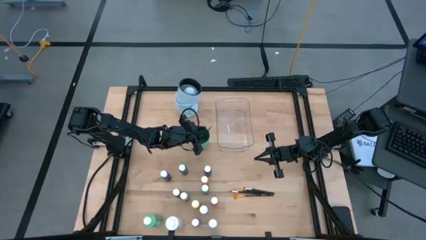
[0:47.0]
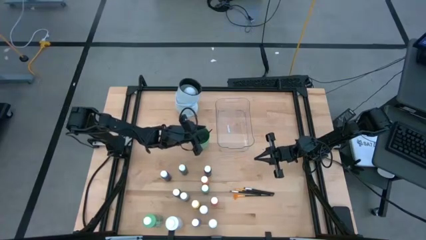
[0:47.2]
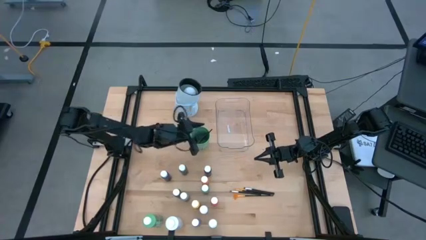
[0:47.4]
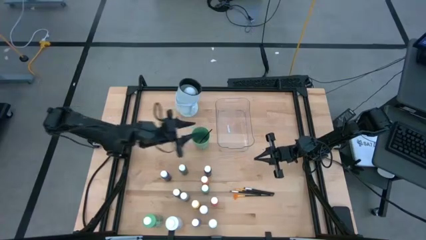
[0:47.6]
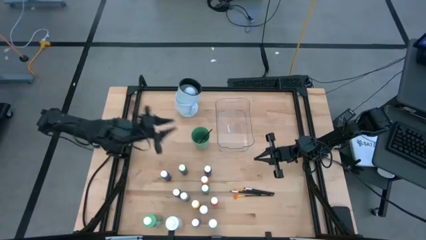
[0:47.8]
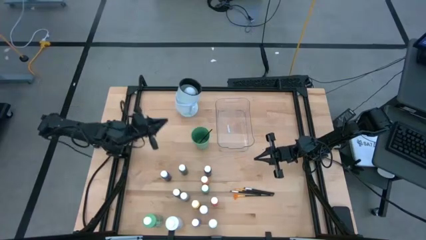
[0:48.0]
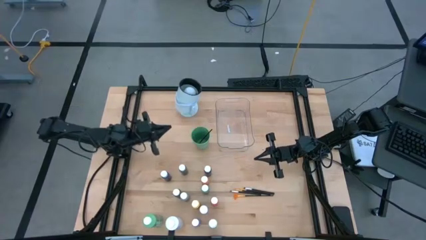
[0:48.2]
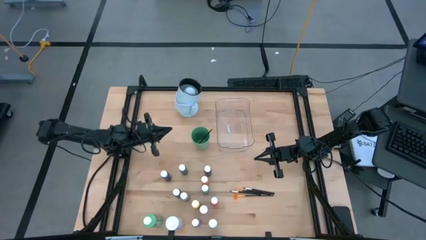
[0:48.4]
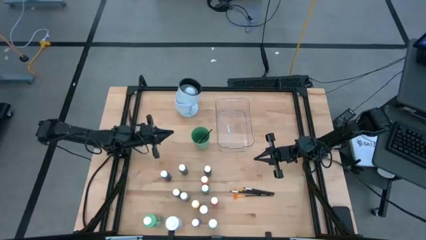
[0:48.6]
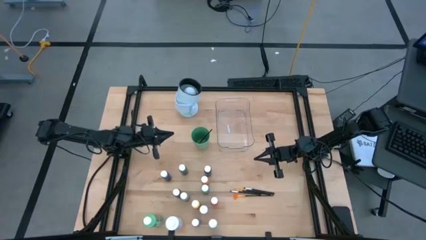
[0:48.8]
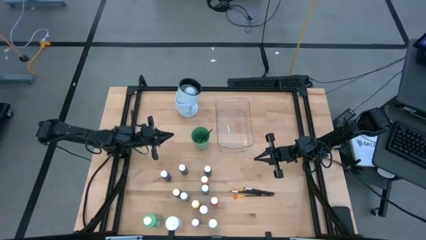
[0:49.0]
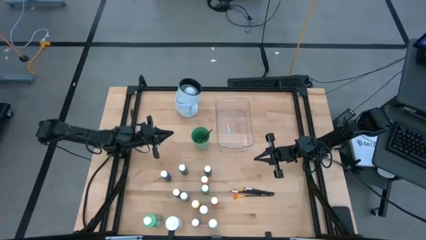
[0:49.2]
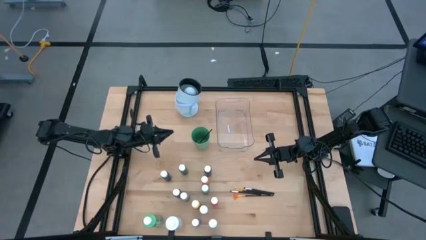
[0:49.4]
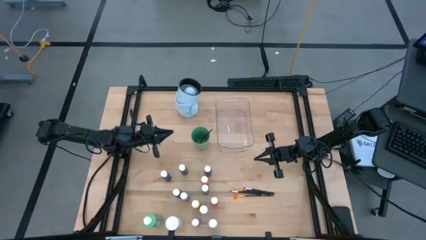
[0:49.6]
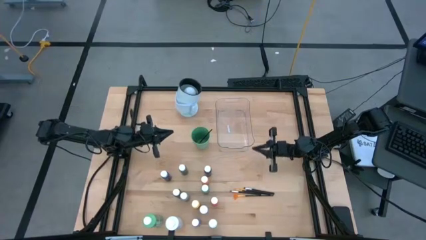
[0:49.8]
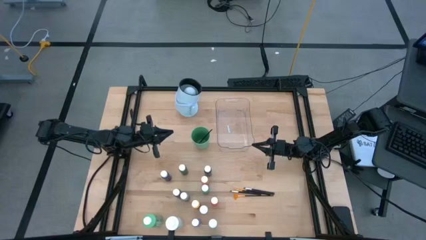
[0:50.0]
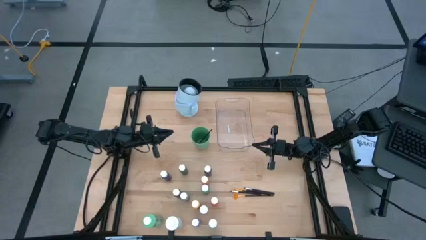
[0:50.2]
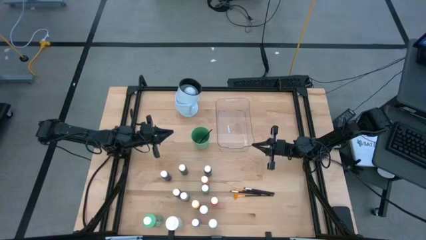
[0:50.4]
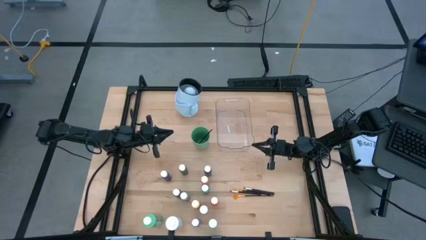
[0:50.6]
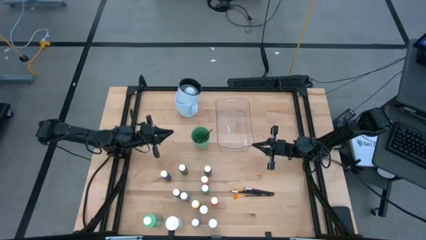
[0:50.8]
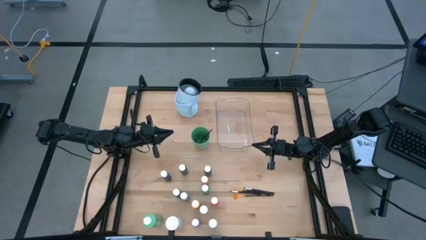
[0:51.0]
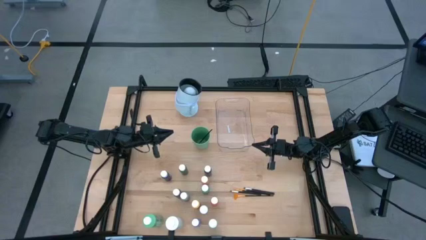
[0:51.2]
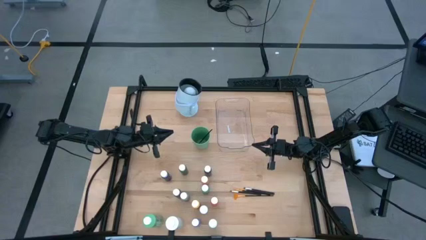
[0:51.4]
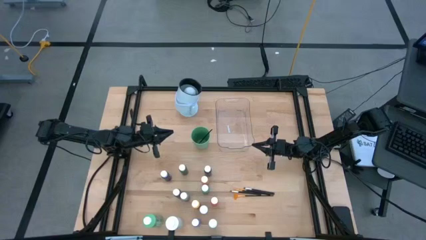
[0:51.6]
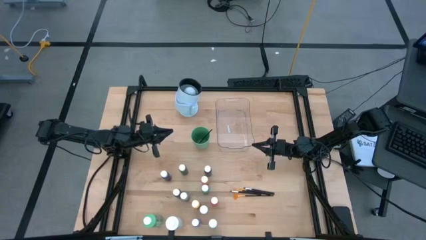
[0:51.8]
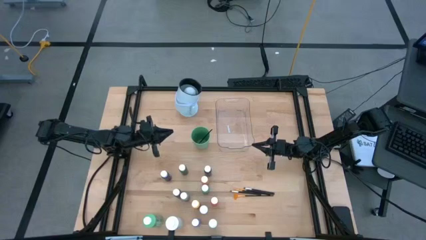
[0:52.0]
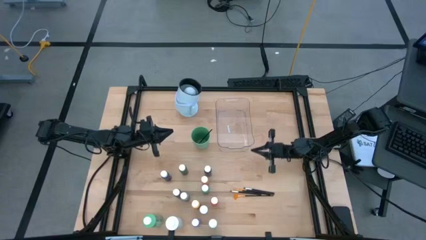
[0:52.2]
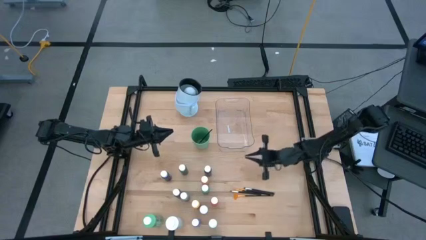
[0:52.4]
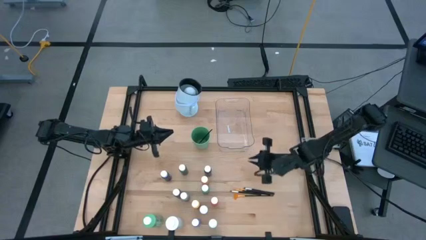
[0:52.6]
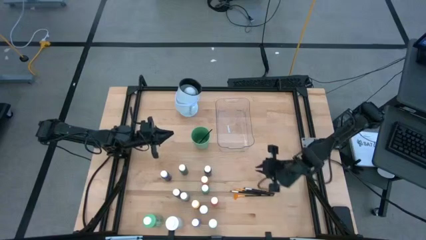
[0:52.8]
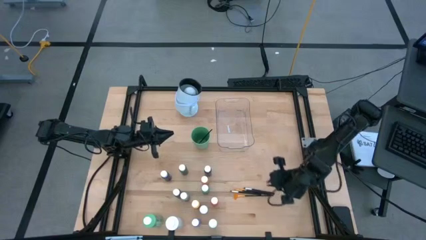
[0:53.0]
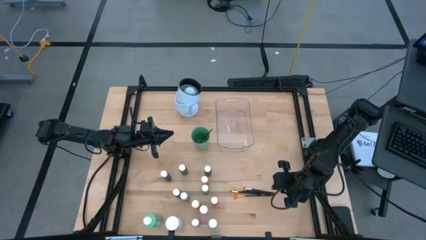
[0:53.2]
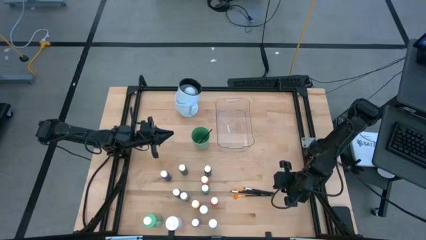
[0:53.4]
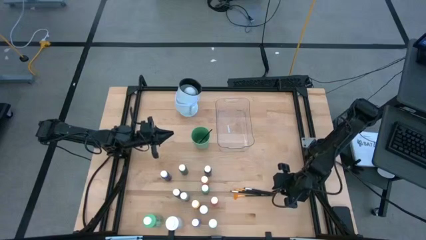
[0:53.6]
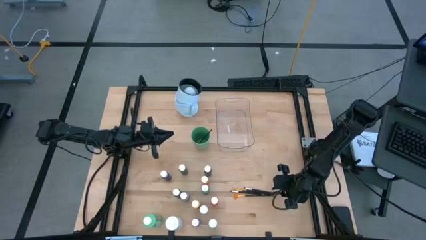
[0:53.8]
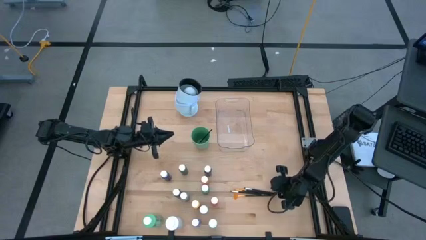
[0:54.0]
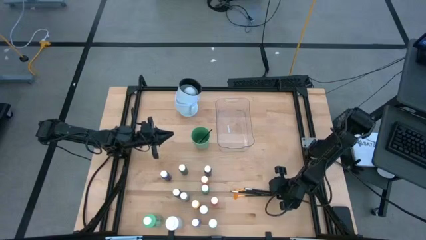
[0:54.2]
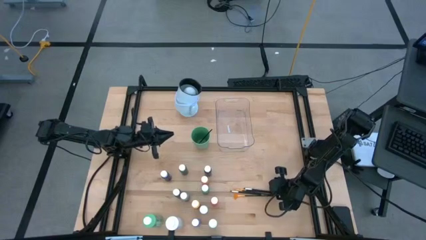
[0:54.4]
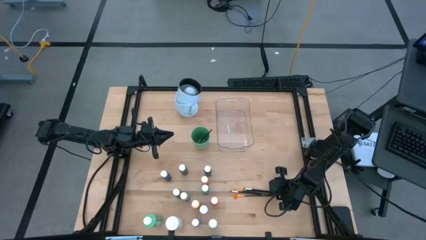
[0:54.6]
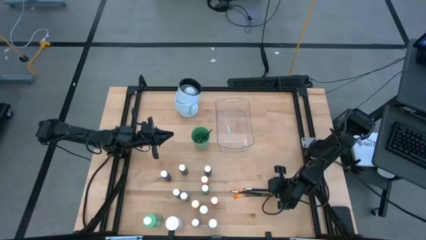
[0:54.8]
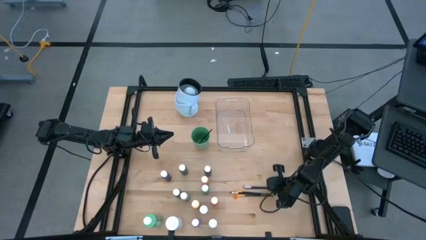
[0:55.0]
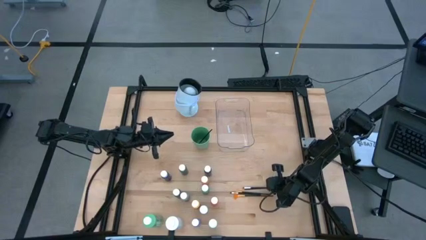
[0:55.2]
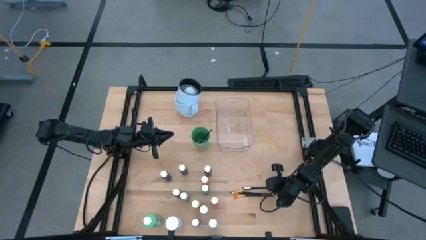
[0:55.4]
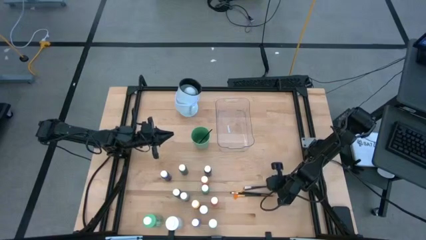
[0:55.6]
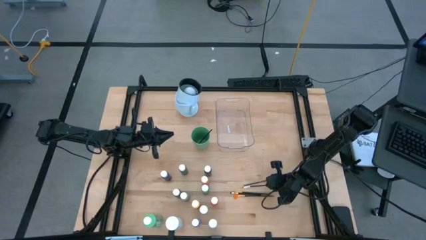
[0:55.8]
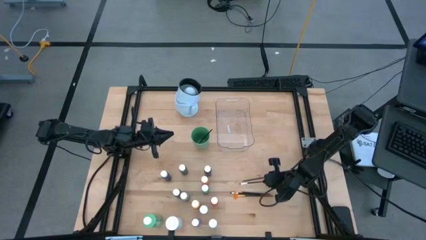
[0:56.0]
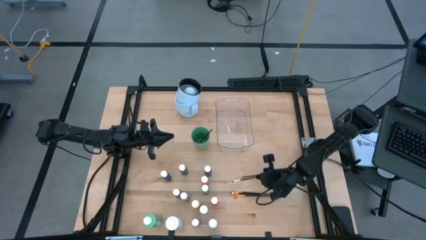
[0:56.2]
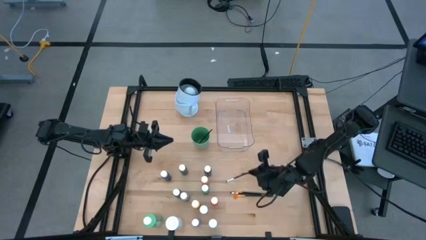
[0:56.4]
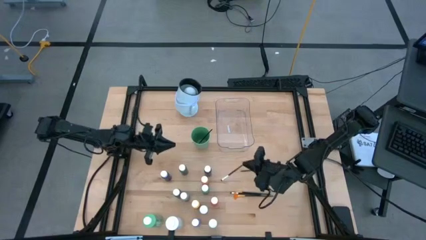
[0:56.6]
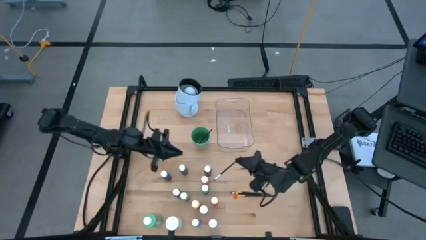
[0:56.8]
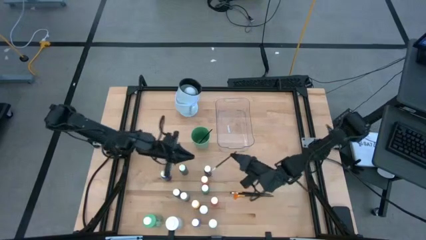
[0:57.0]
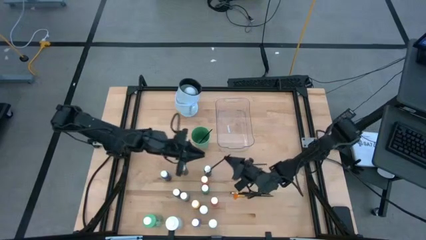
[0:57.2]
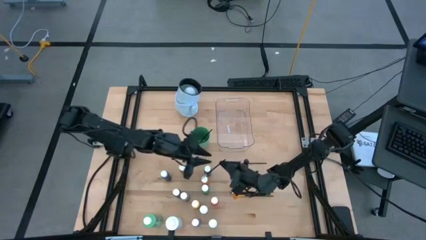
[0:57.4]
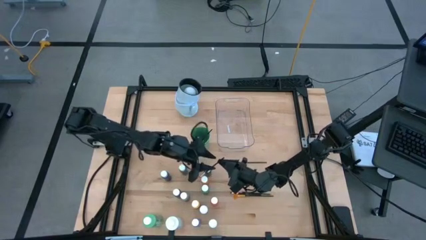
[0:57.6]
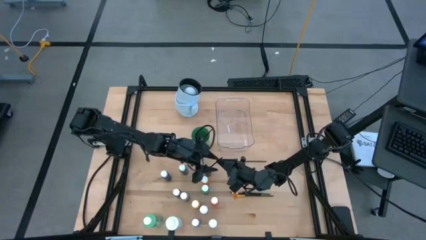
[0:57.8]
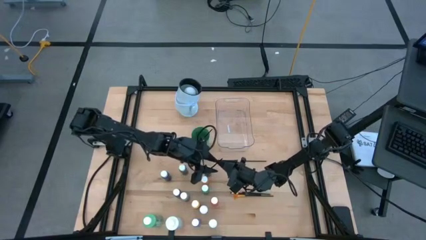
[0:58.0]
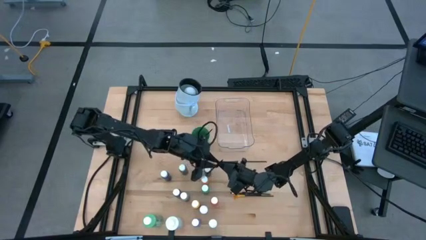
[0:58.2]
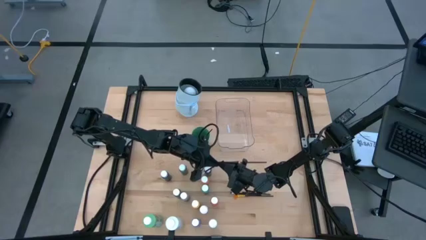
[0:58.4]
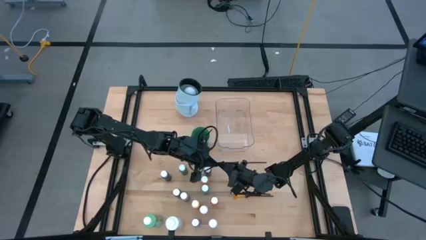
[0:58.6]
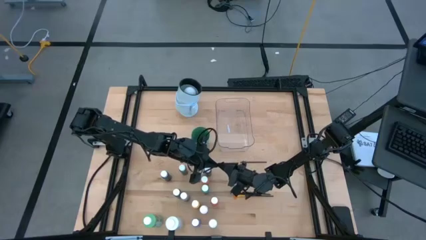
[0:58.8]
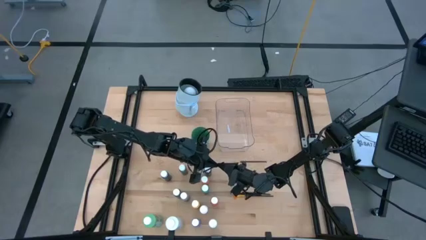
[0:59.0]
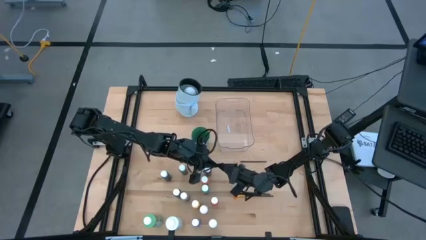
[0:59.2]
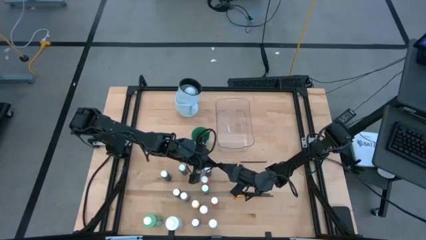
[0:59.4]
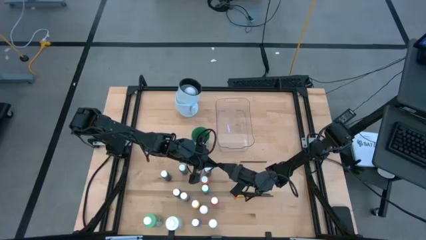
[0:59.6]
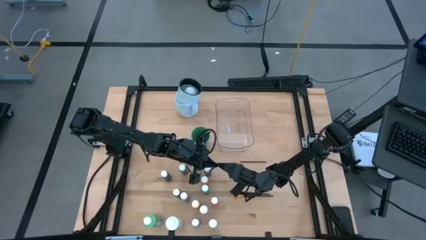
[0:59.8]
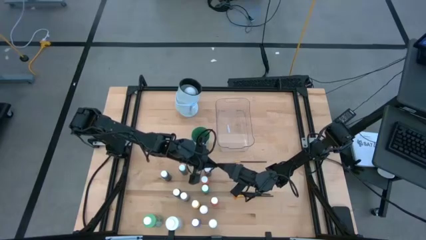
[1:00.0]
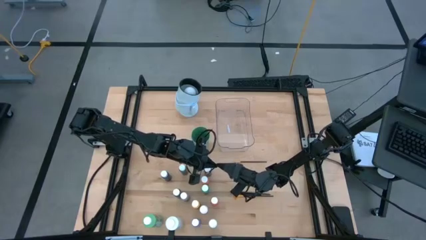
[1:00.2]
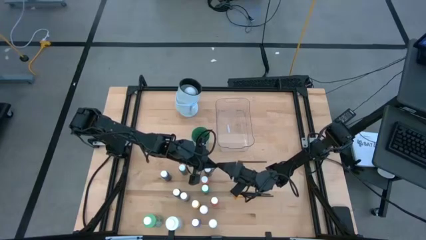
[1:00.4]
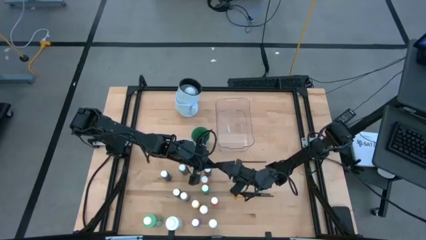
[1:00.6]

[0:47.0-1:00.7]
Task: Pick & Place Paint Supplies
Put the white paintbrush into the green cup

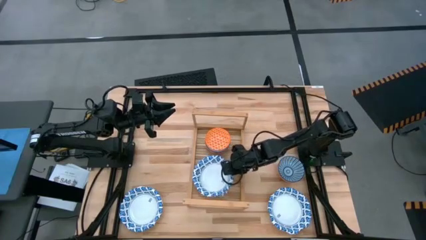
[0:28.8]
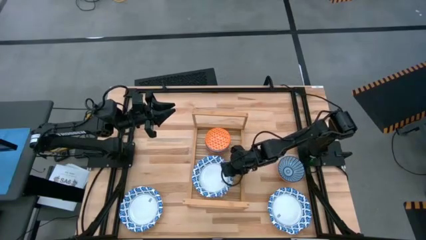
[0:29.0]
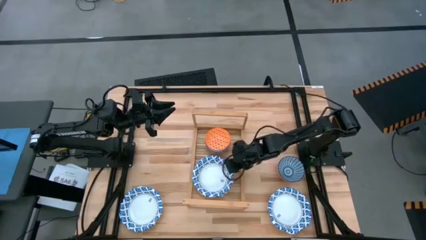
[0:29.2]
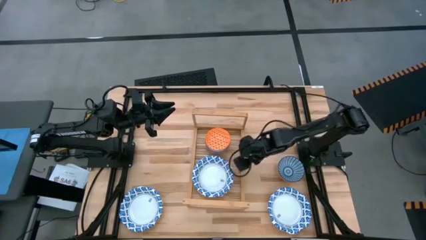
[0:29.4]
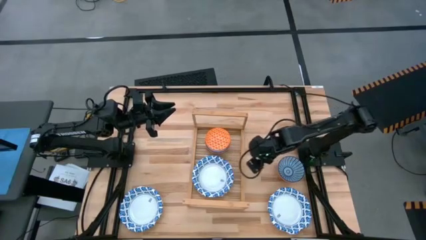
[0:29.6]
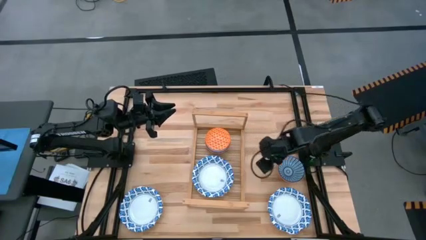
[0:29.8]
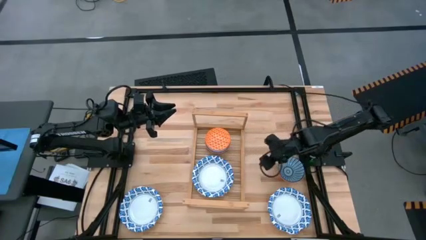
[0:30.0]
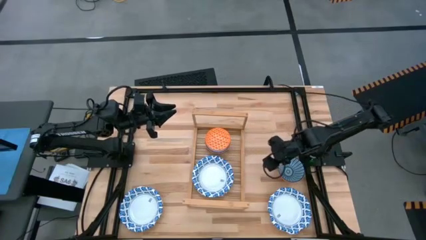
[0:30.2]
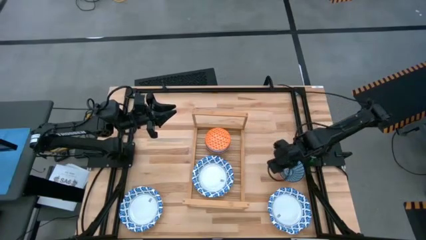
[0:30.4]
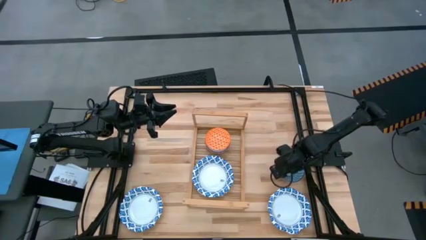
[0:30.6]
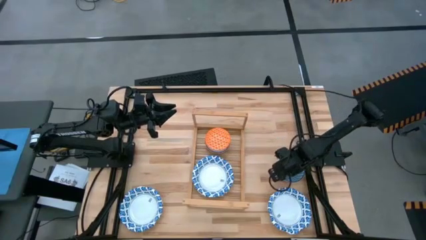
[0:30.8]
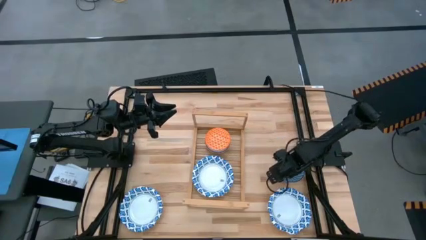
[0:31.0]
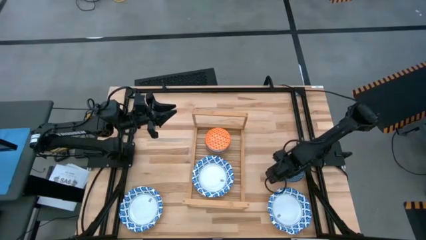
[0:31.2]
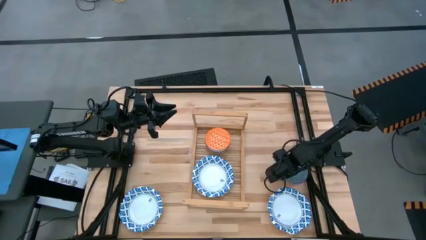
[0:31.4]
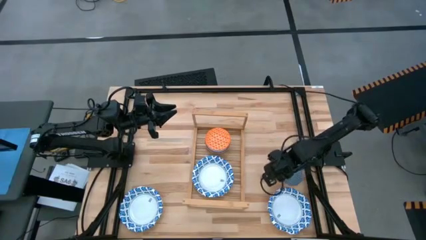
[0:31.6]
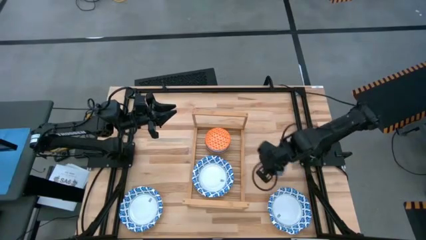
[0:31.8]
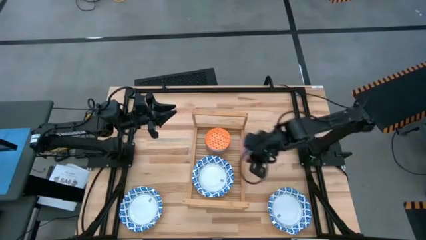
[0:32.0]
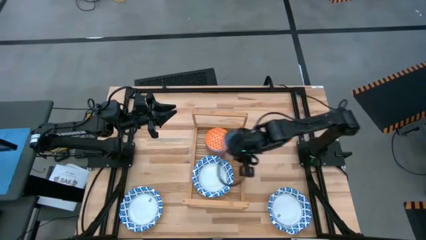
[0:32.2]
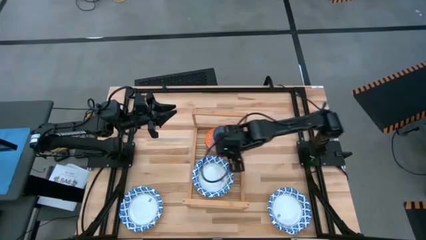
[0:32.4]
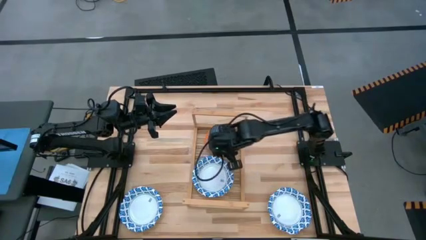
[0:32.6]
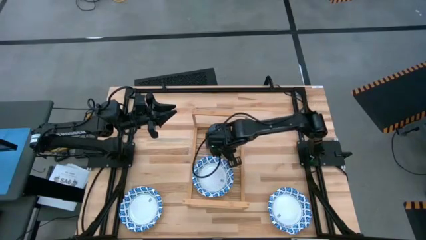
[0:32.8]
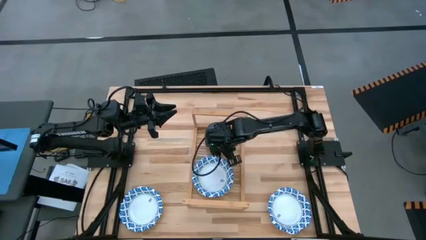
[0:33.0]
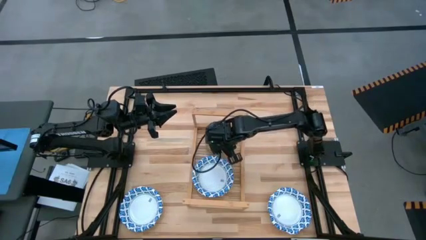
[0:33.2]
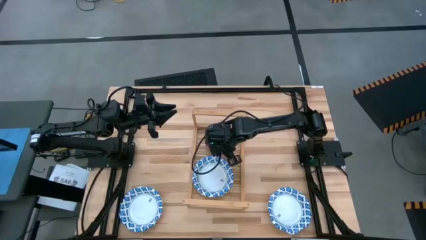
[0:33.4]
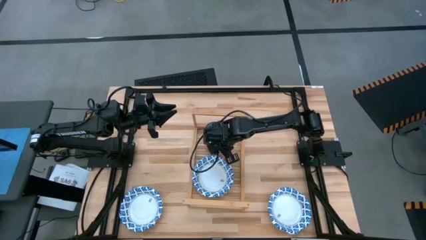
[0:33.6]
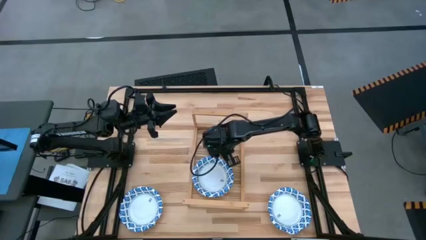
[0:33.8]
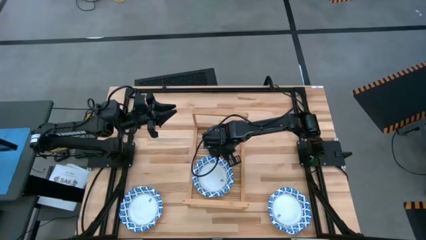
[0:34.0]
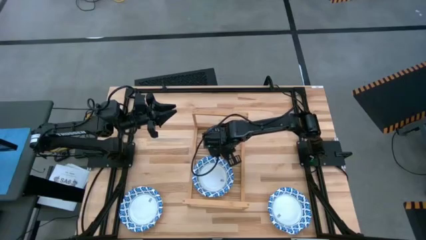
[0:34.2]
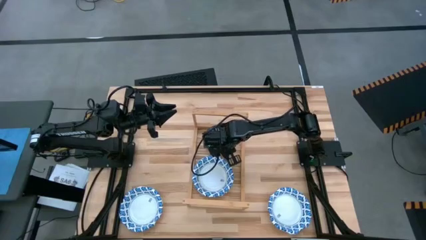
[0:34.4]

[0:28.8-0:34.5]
Task: Place and stack bowls onto a shelf
Stack the blue patterned bowl into the orange patterned bowl
